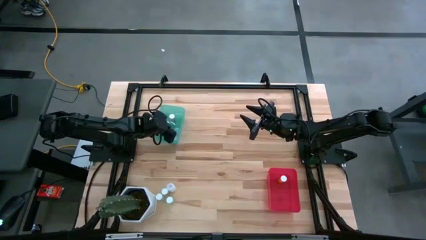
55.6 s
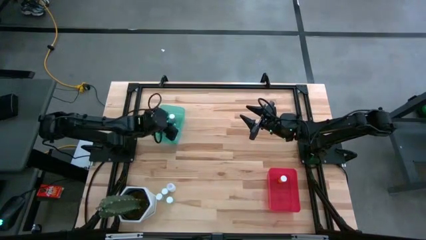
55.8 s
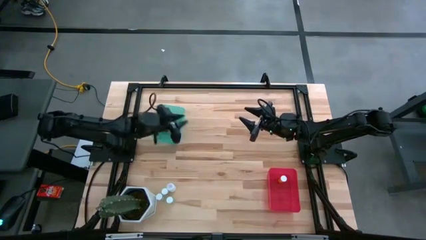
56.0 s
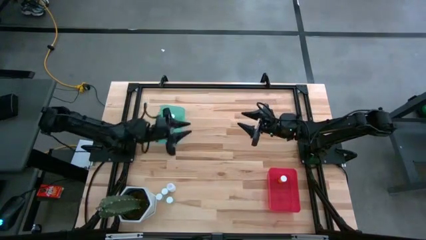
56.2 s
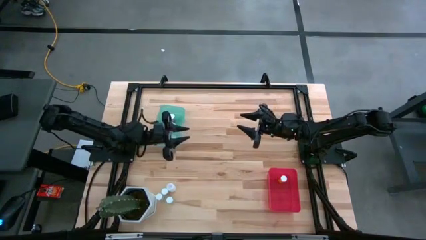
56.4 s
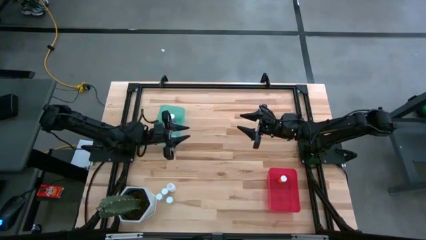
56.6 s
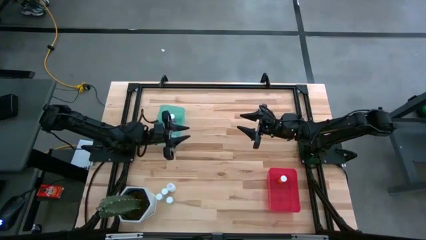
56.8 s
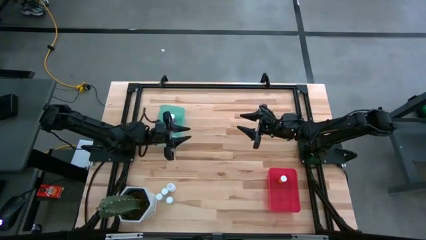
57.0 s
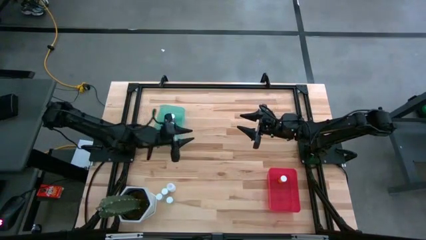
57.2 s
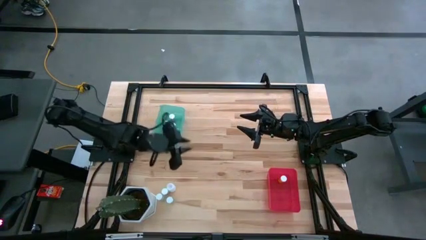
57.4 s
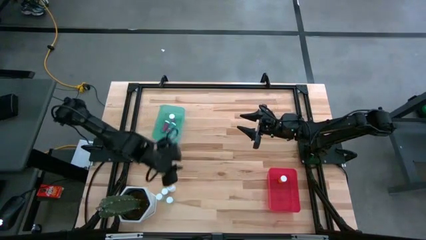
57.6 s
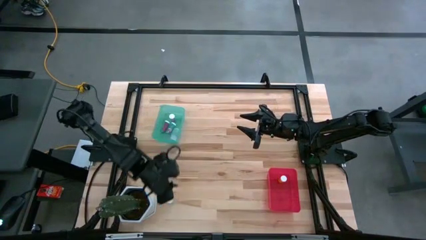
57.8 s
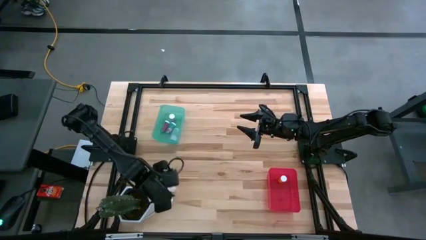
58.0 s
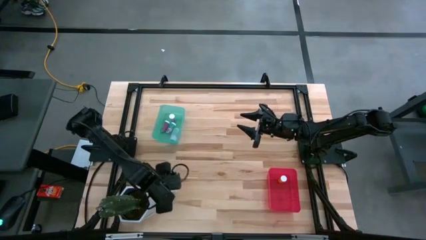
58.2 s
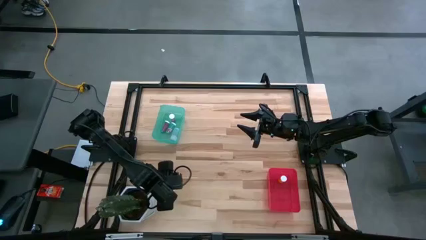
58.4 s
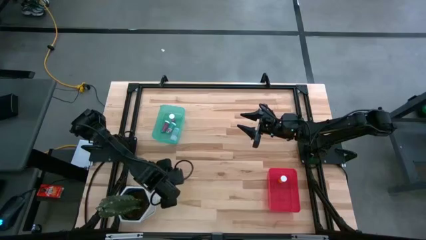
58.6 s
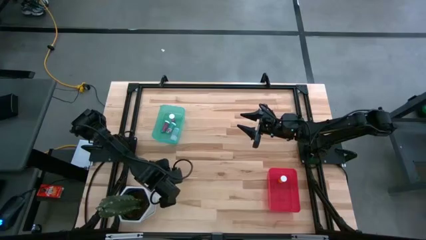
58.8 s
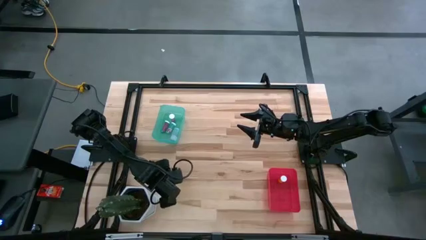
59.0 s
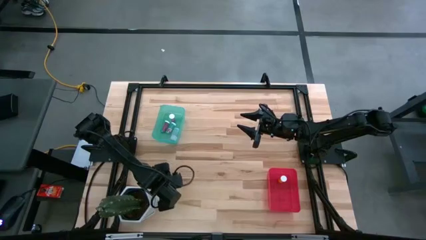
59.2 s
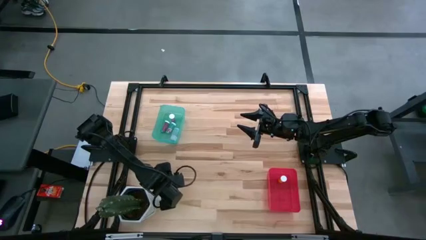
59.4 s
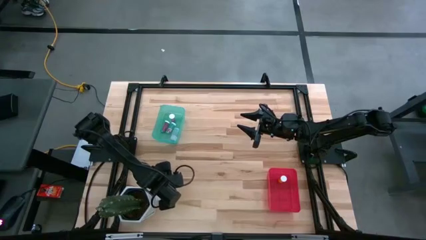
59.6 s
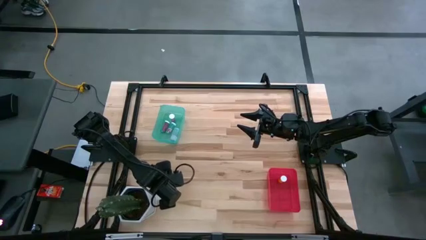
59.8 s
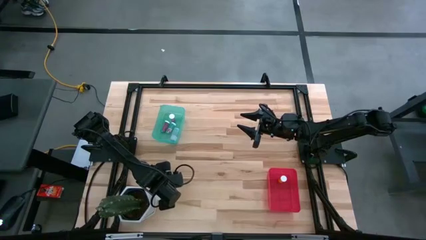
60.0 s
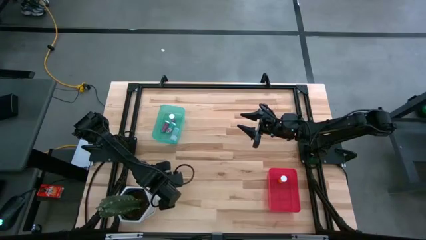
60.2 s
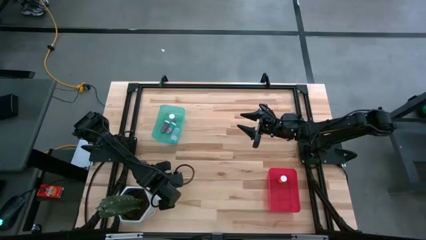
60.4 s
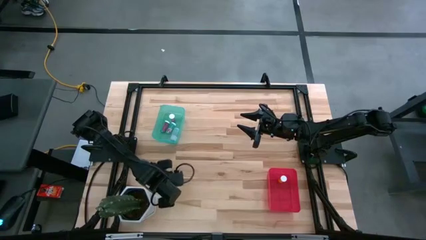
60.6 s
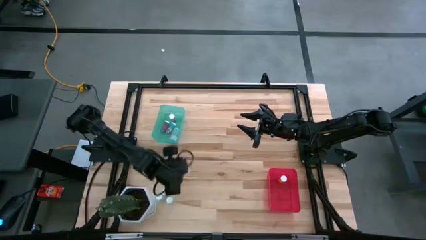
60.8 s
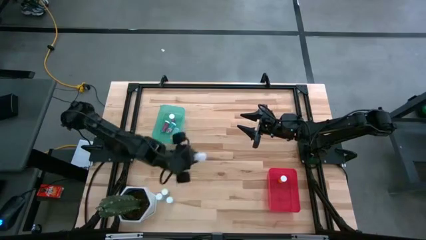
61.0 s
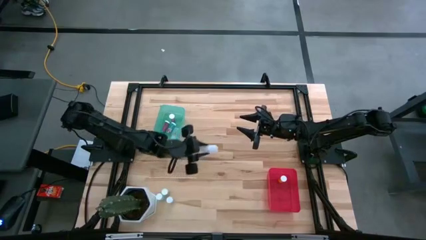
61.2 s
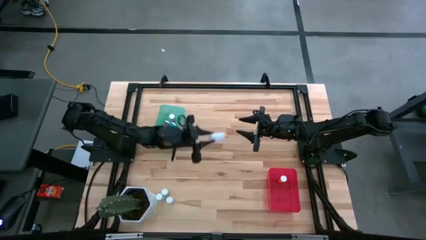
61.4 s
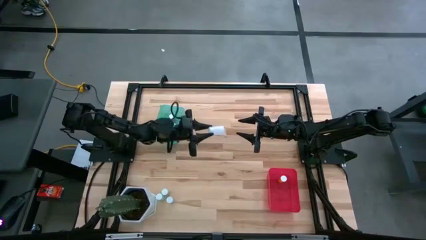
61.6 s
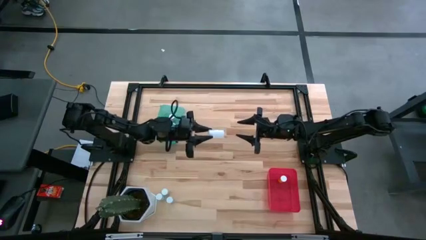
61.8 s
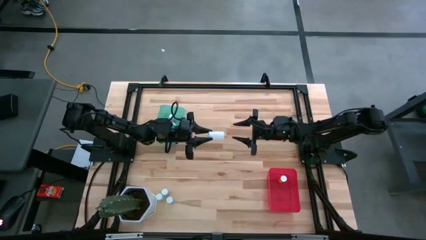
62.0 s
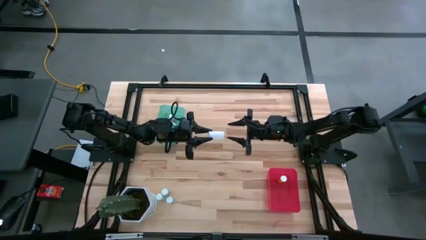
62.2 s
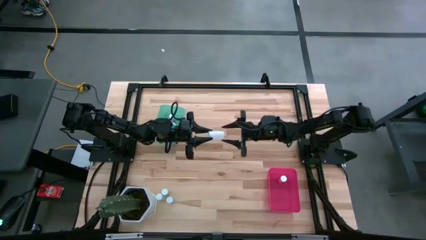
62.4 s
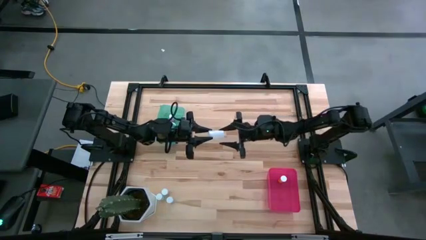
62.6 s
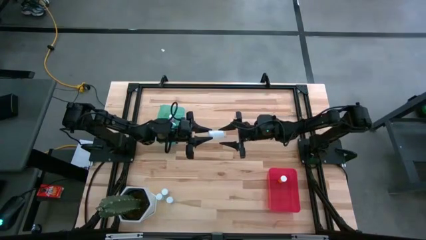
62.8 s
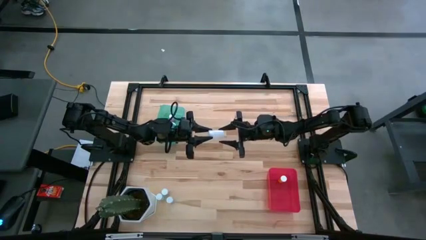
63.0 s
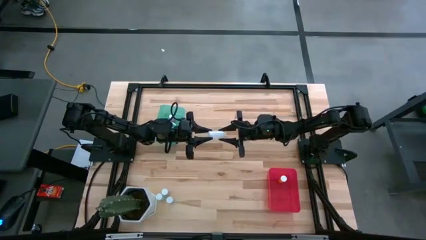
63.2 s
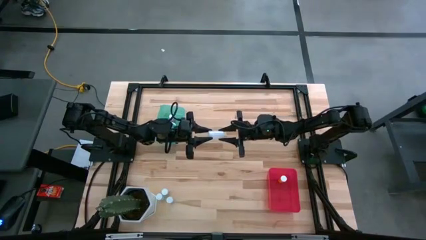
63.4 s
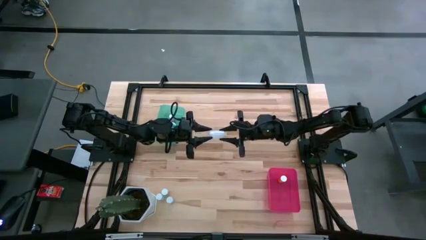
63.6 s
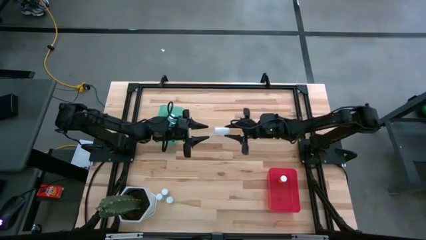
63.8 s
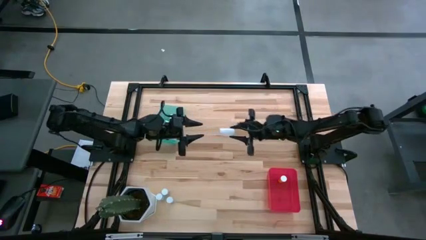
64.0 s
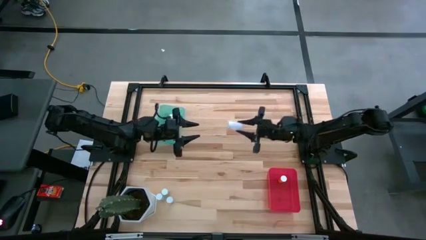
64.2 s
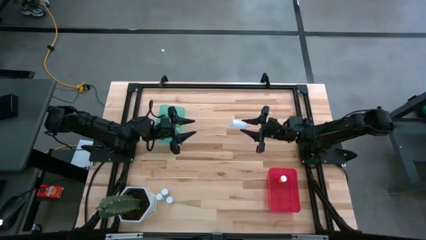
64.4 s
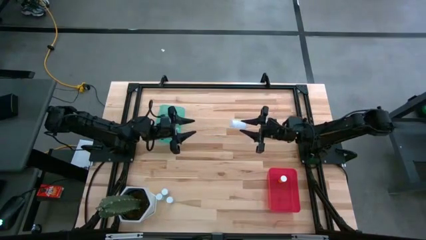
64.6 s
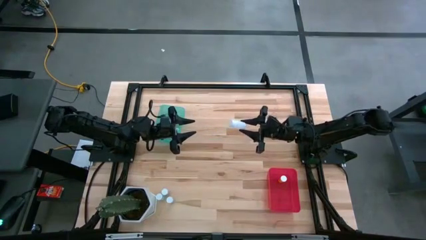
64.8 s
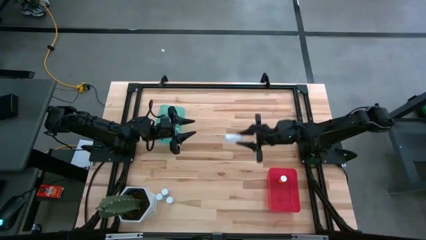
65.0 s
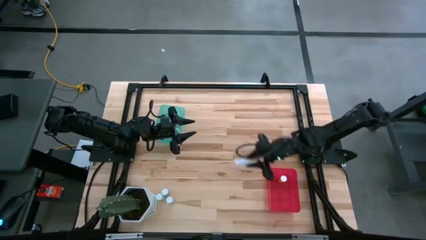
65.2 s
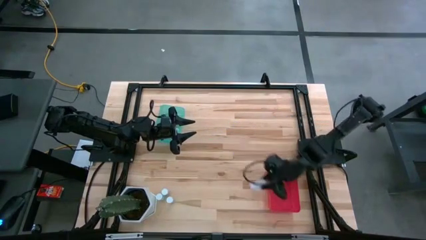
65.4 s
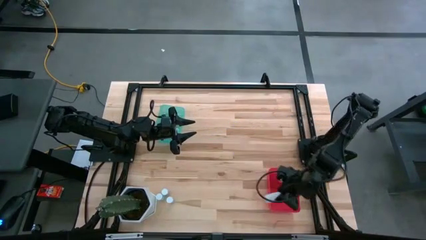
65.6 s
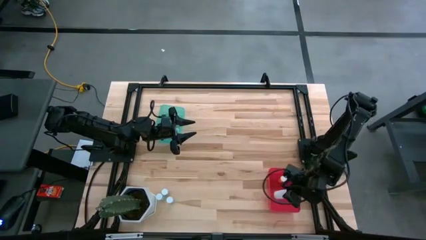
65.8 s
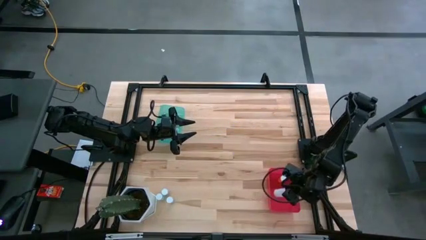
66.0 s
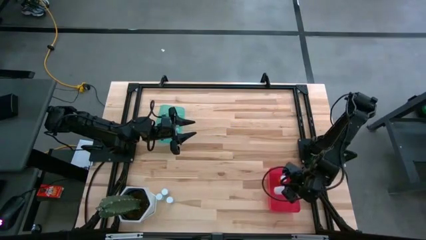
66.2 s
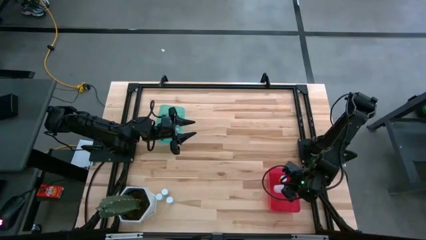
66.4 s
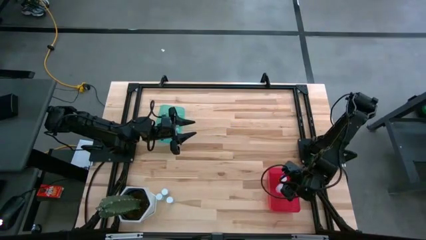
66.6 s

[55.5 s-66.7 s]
Task: Pick and place medicine bottles into bin by pill shape (circle, oval)
Put the white tablet bottle into the red bin
